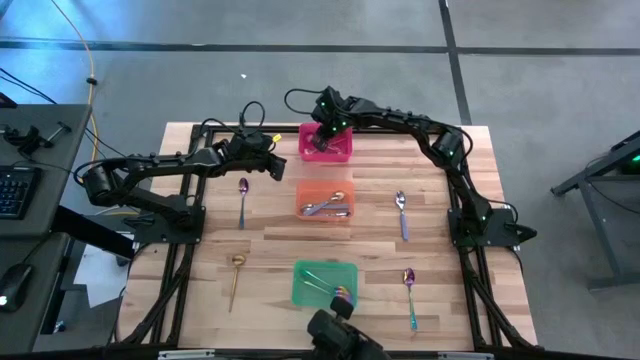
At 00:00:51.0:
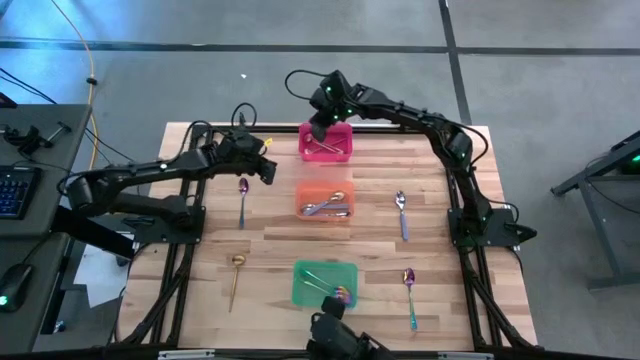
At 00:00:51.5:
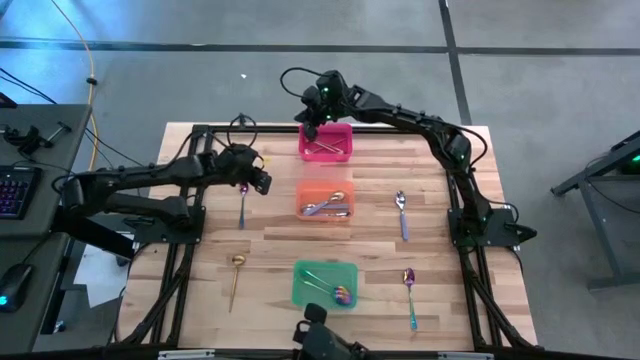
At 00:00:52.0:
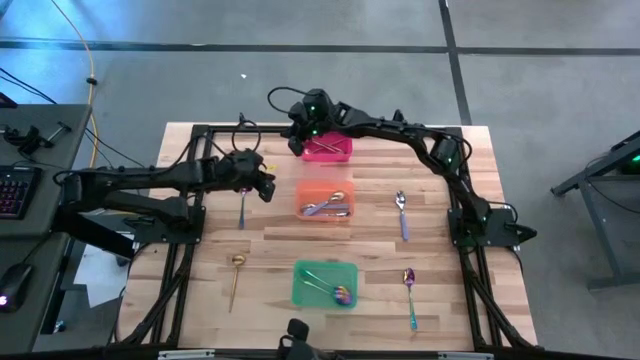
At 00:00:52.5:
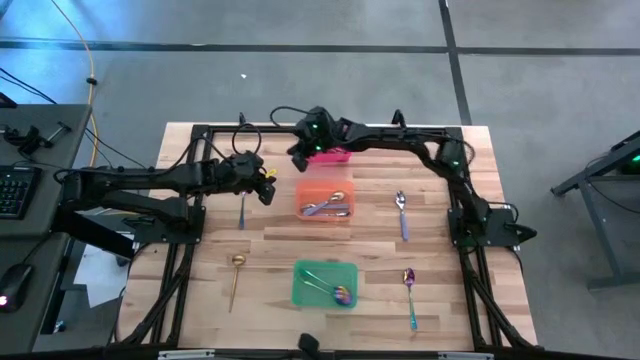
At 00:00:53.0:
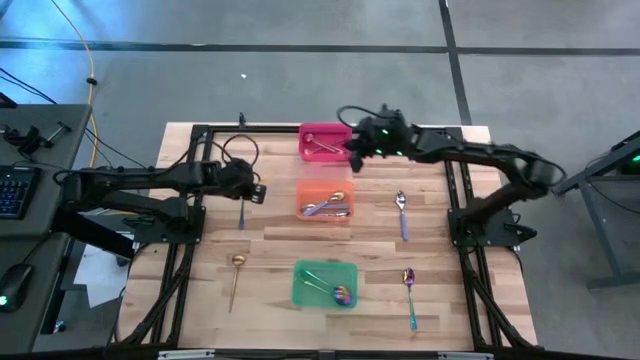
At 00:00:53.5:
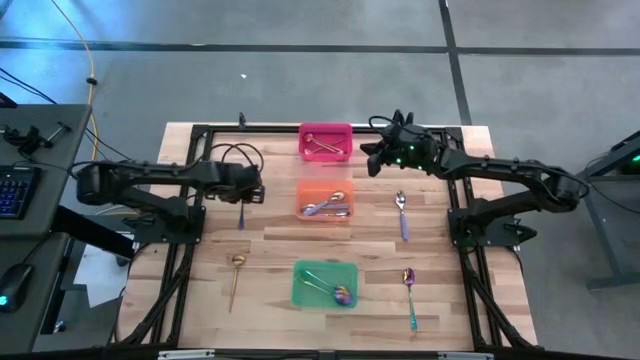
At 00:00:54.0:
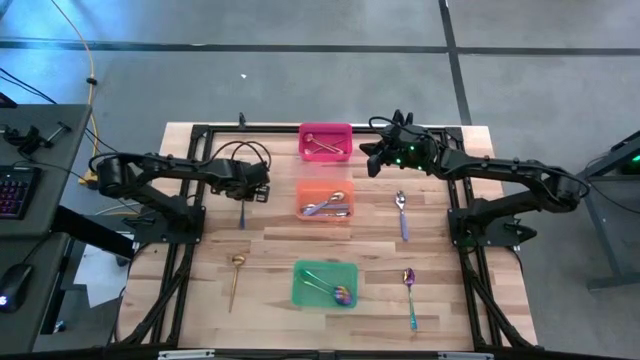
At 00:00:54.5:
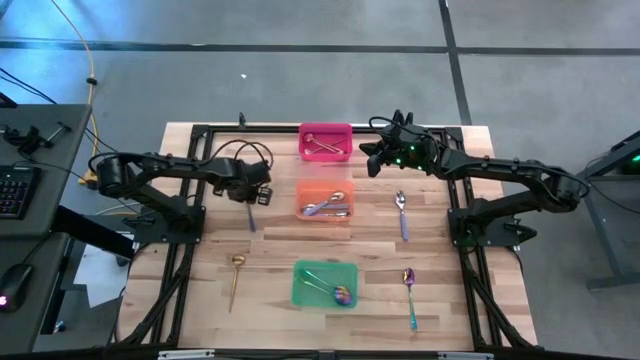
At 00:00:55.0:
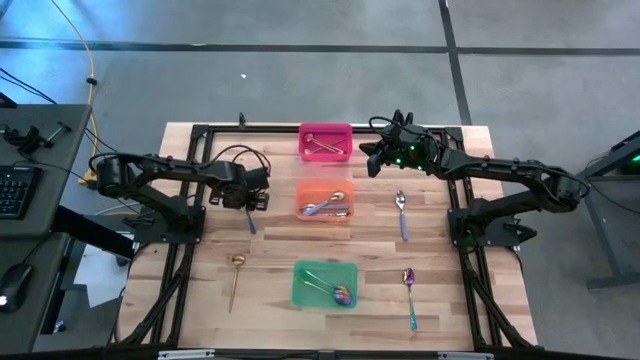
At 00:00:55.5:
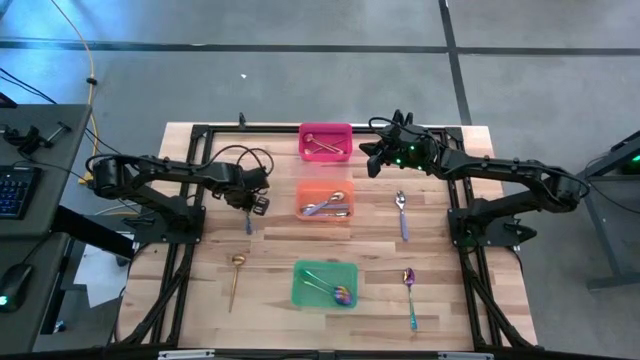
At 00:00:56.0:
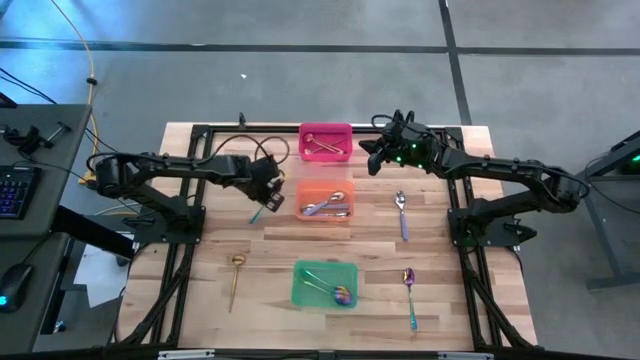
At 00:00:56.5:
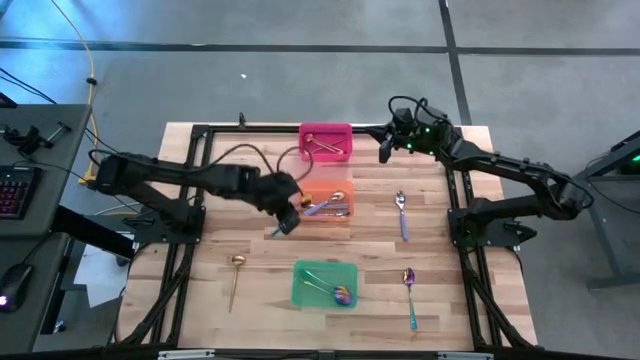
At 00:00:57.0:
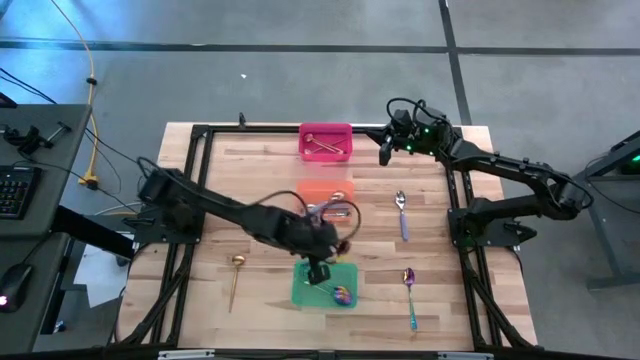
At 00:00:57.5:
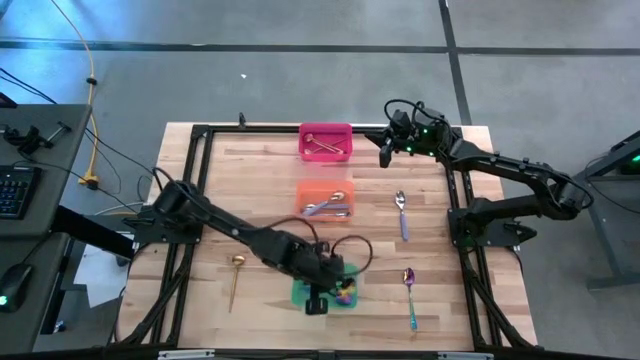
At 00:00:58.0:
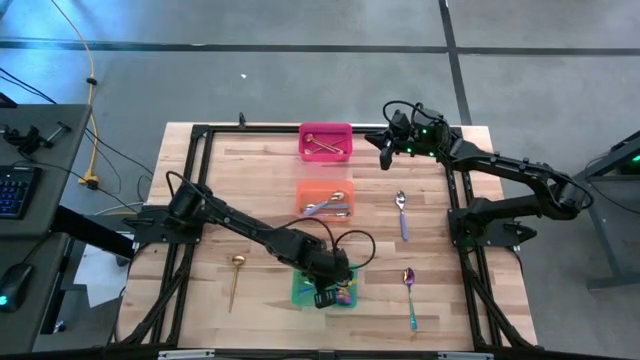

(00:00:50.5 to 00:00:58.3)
Task: Sort silverware by color (type)
Put the blue spoon into the green bin

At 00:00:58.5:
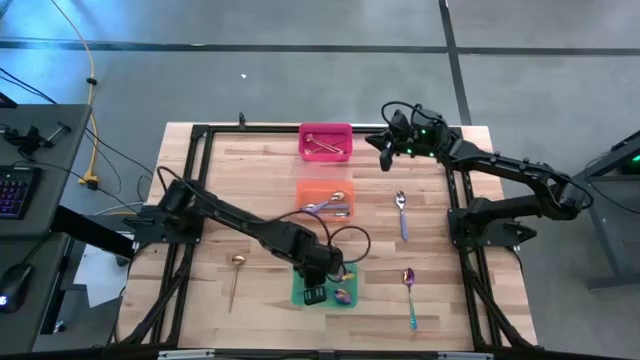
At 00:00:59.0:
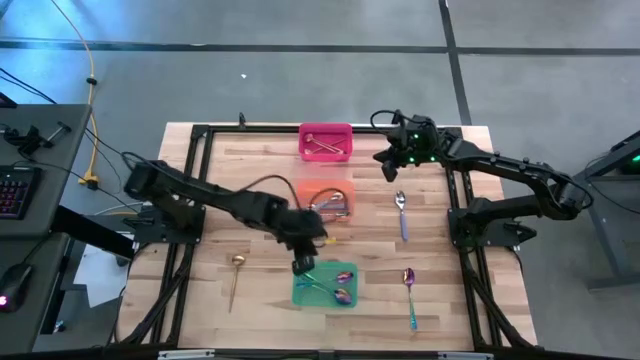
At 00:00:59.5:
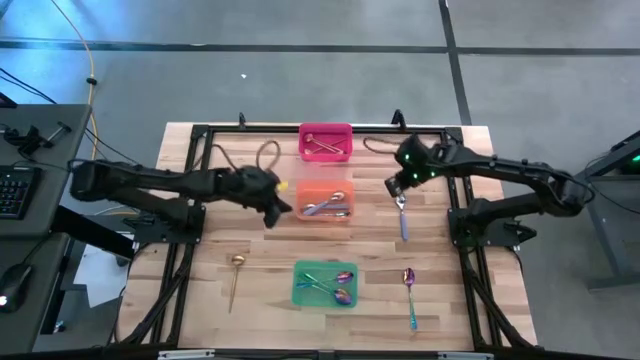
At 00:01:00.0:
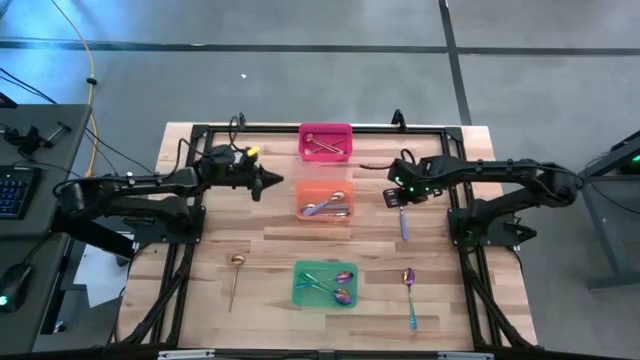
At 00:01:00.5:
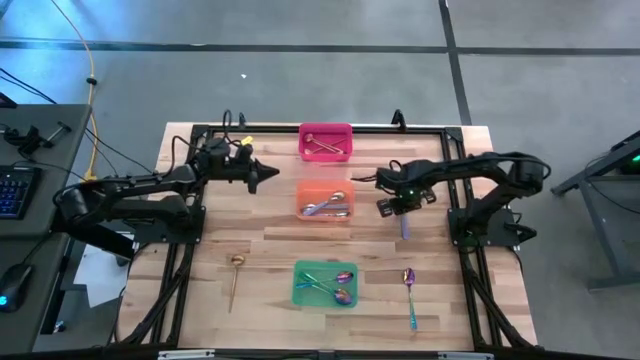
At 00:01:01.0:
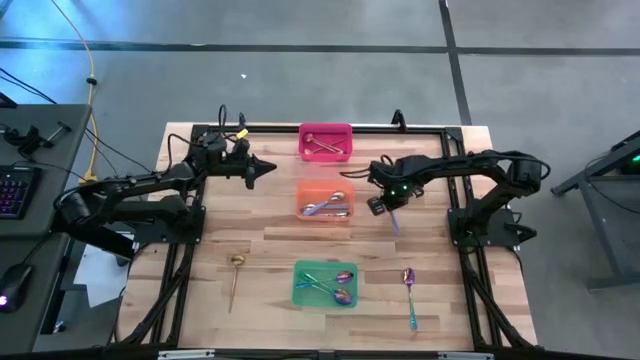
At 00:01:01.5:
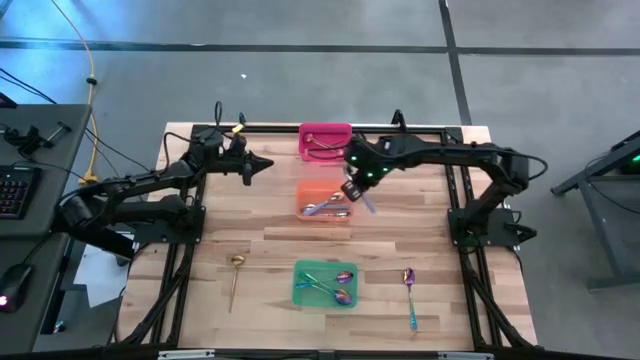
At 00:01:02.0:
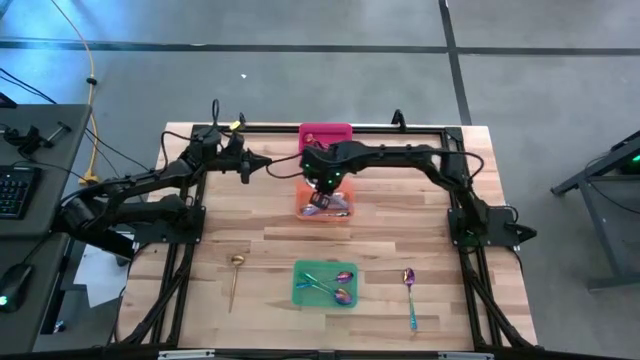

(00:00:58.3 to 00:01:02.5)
Put the purple spoon into the orange bin

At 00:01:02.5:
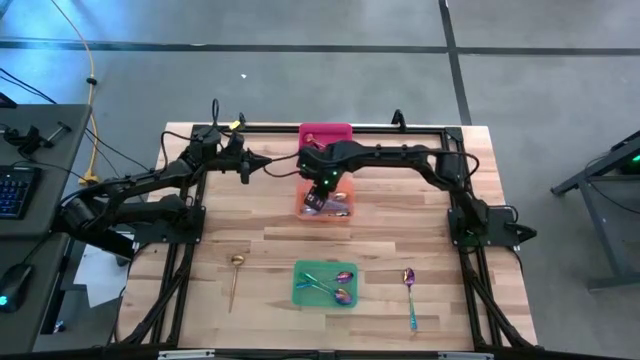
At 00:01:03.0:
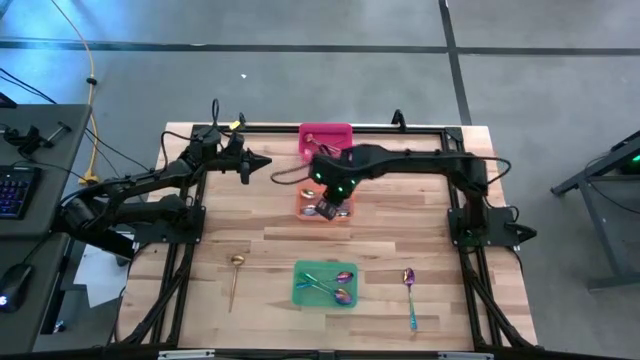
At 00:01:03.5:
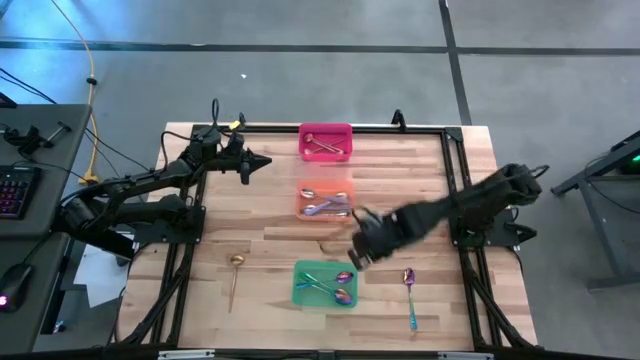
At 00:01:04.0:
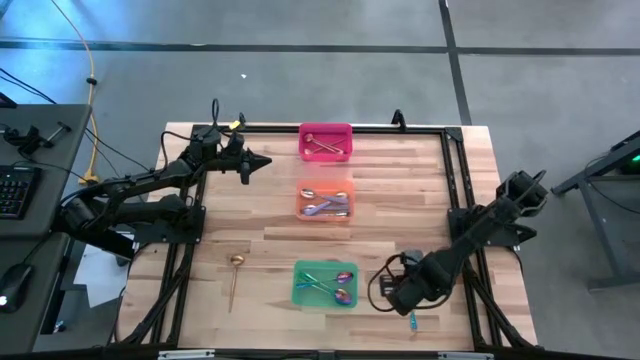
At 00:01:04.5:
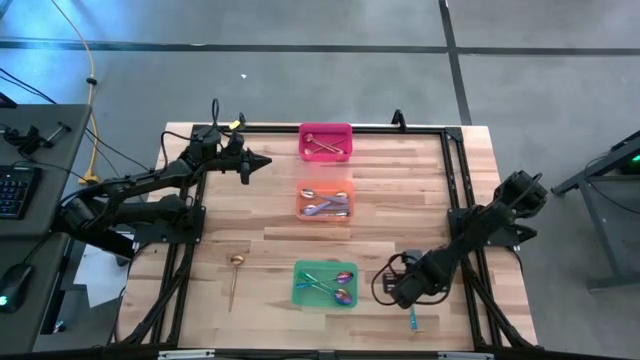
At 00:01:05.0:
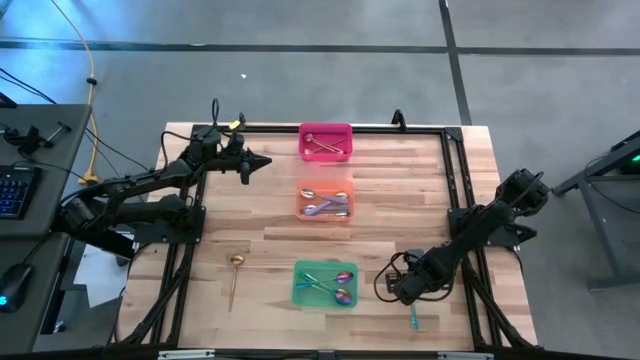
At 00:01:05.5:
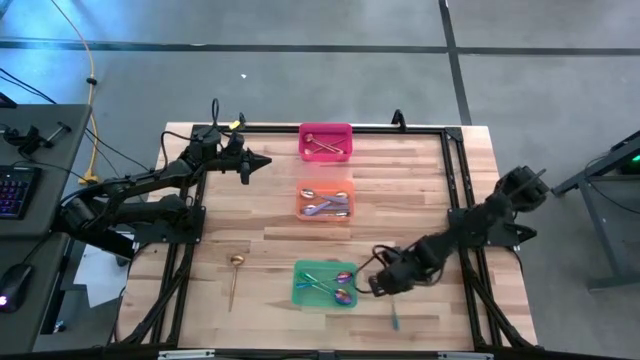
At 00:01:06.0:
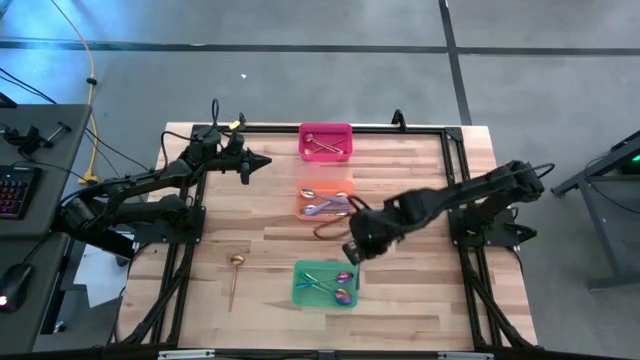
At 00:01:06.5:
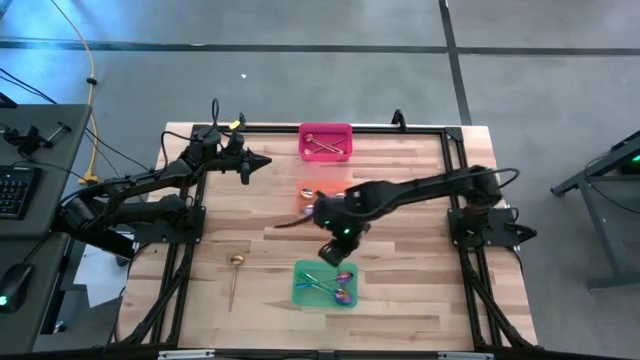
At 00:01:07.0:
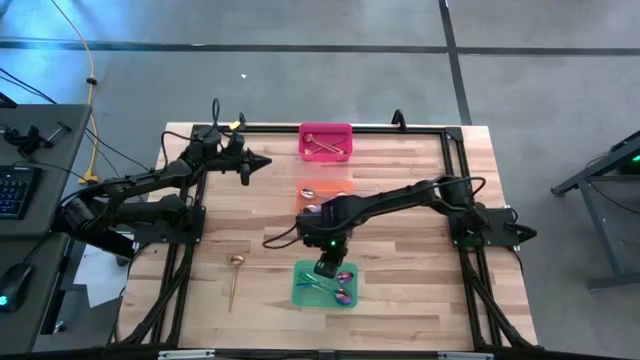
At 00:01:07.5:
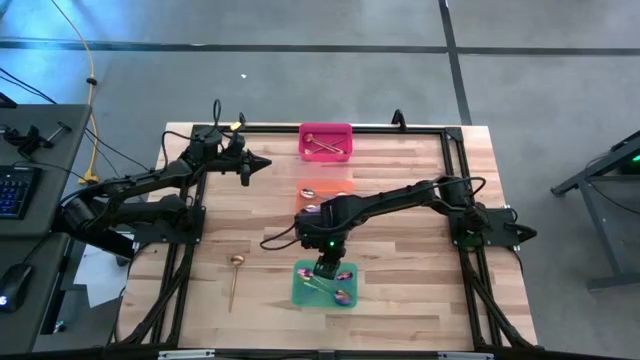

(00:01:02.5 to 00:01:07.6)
Put the blue spoon into the green bin

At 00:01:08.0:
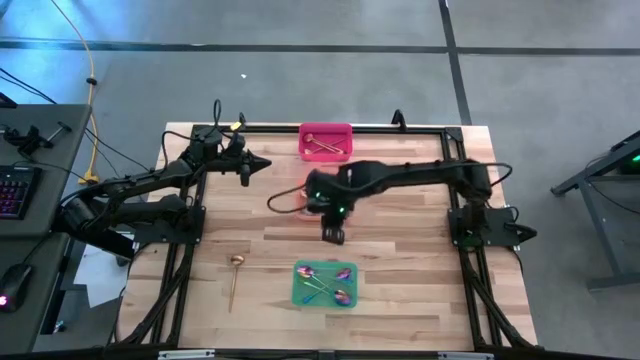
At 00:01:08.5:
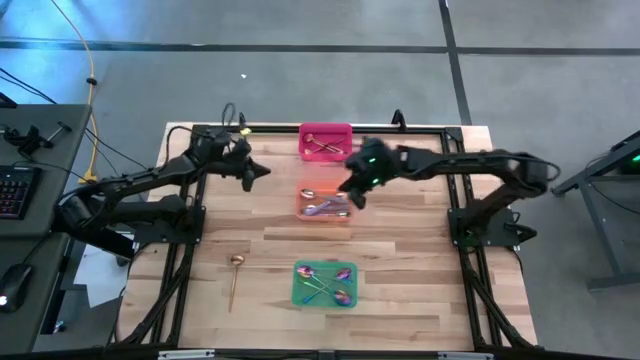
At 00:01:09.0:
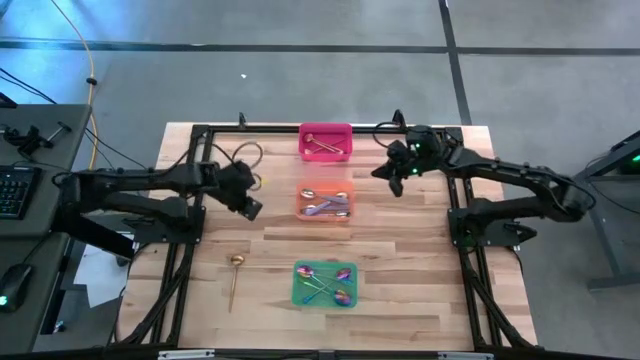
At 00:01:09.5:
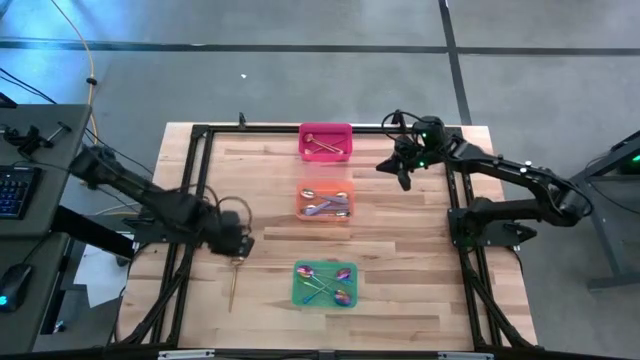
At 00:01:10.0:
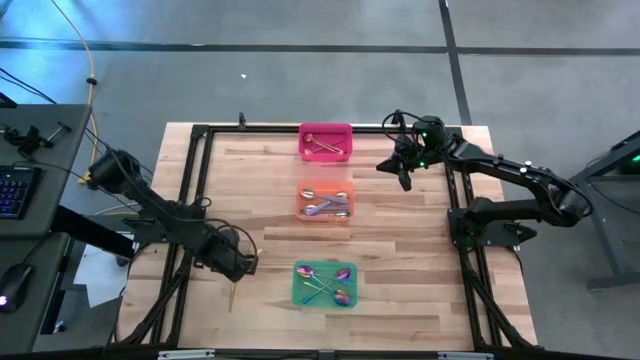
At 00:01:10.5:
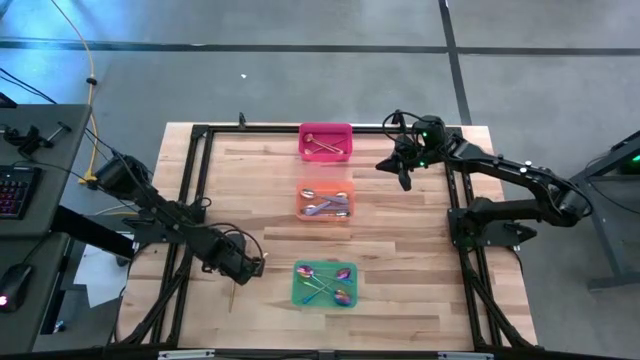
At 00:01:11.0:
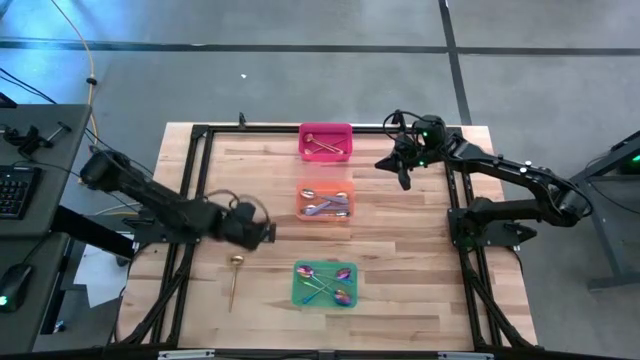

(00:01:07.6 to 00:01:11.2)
Put the gold spoon into the red bin
